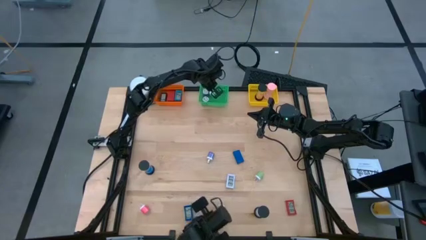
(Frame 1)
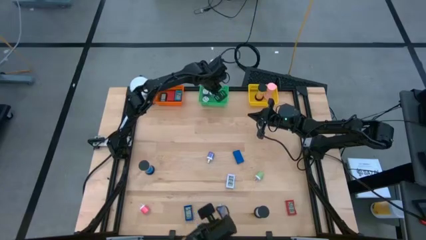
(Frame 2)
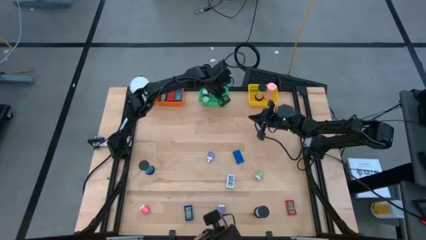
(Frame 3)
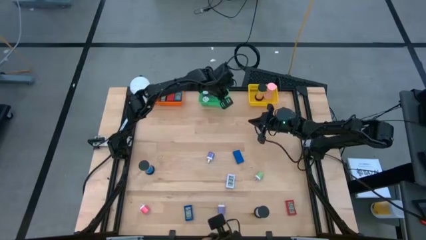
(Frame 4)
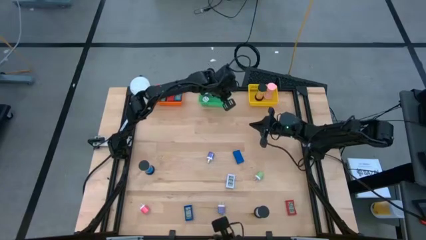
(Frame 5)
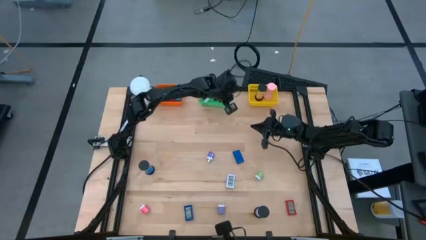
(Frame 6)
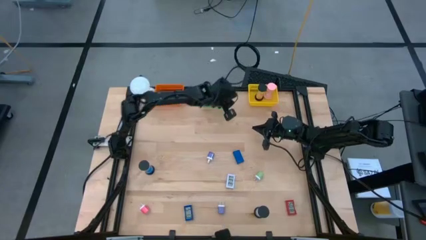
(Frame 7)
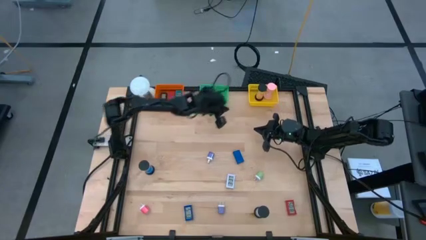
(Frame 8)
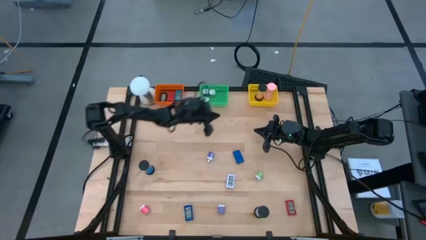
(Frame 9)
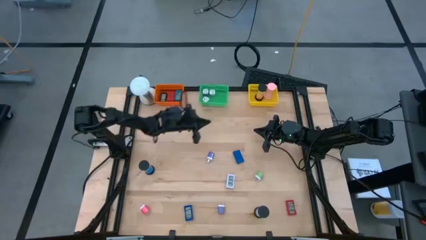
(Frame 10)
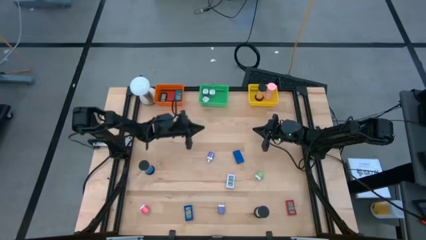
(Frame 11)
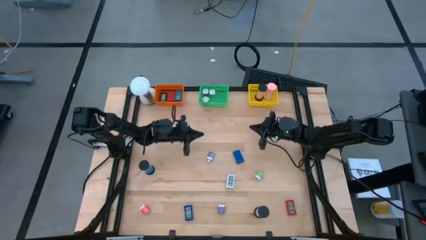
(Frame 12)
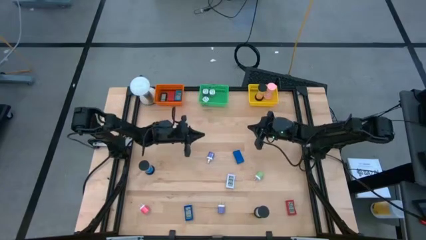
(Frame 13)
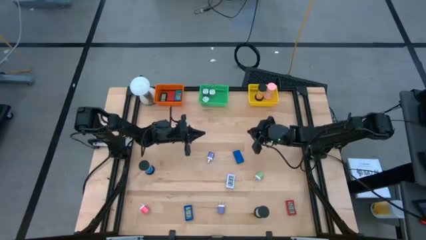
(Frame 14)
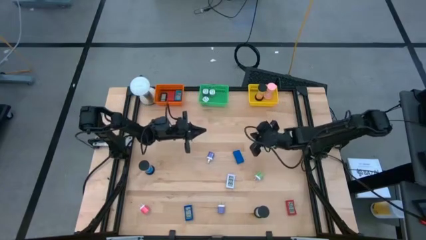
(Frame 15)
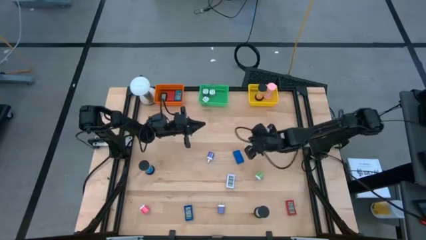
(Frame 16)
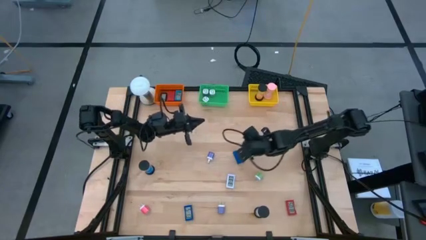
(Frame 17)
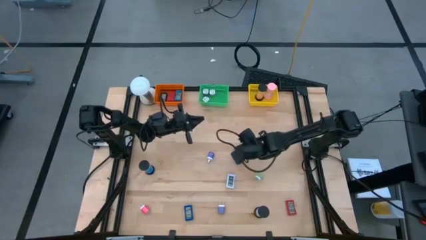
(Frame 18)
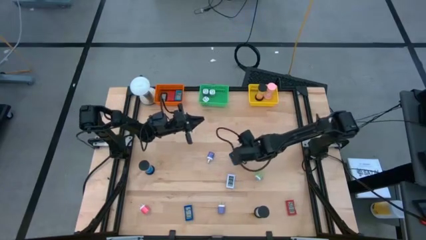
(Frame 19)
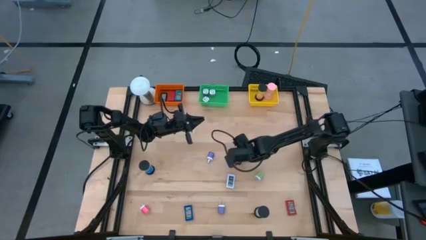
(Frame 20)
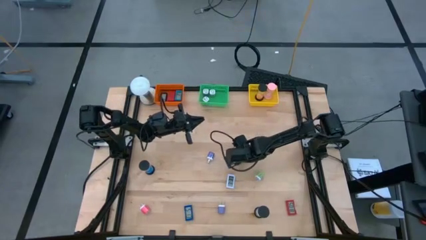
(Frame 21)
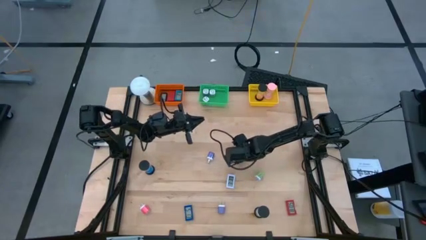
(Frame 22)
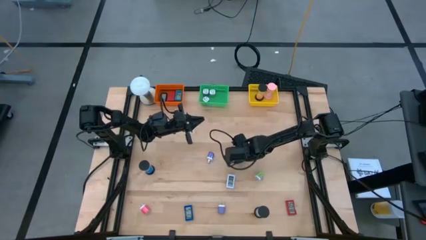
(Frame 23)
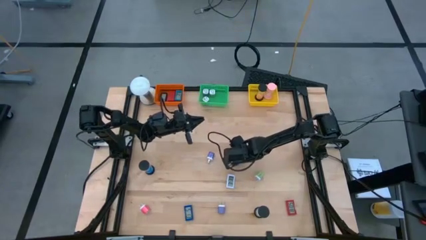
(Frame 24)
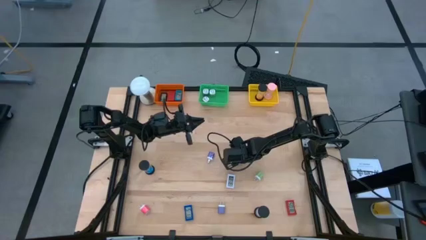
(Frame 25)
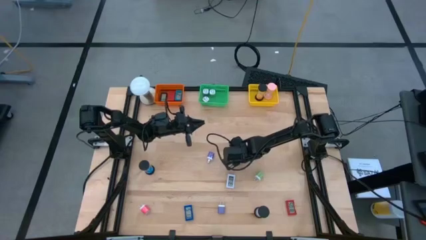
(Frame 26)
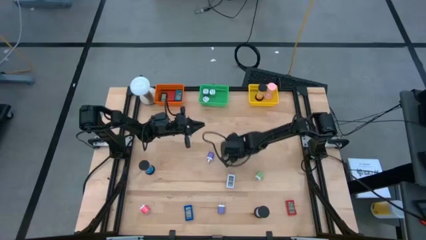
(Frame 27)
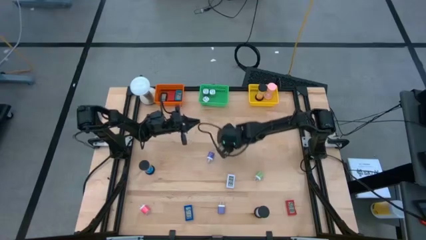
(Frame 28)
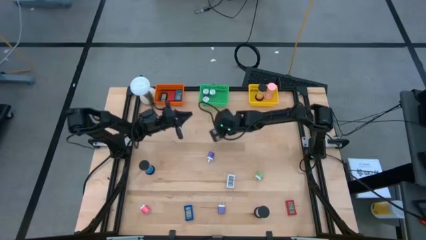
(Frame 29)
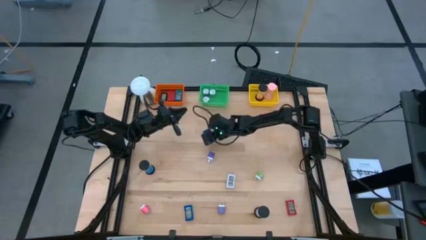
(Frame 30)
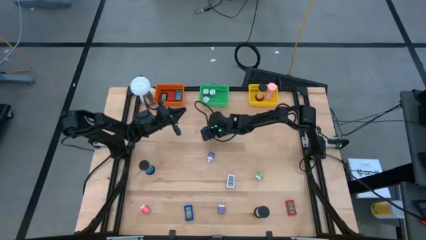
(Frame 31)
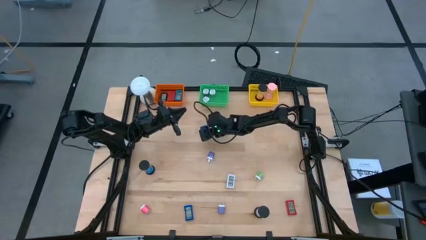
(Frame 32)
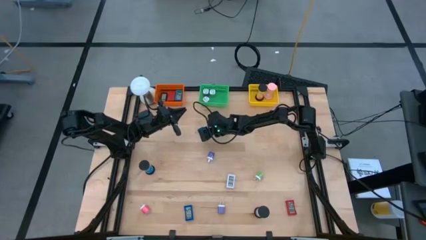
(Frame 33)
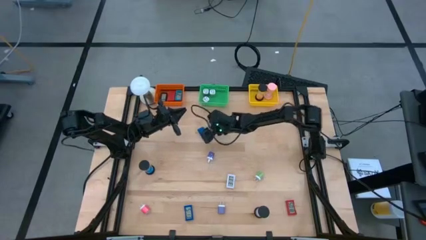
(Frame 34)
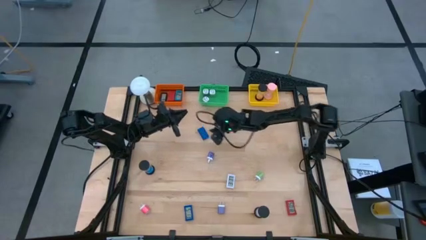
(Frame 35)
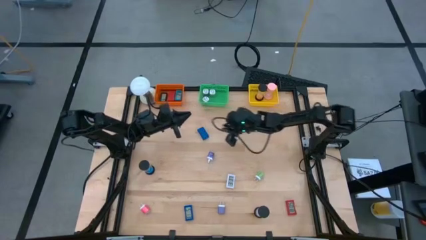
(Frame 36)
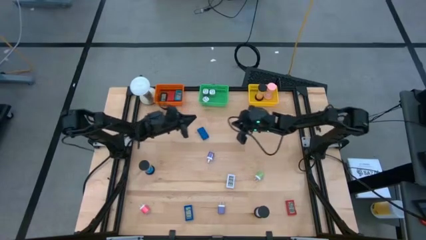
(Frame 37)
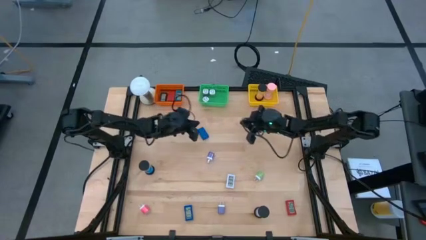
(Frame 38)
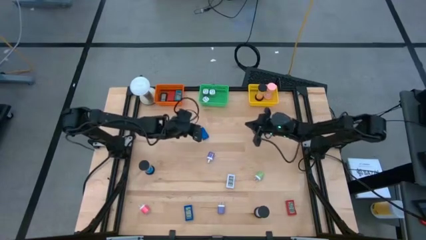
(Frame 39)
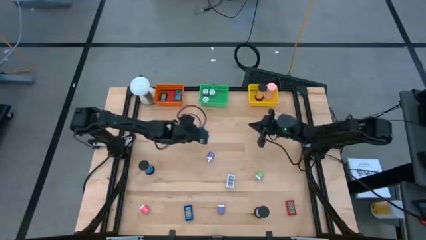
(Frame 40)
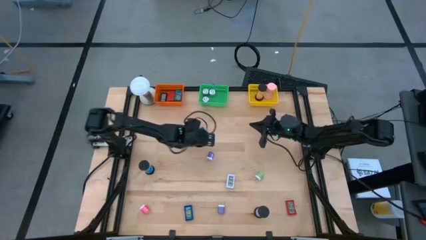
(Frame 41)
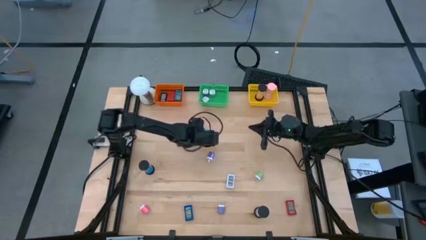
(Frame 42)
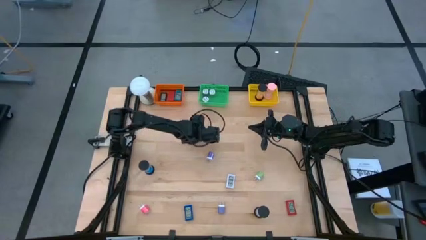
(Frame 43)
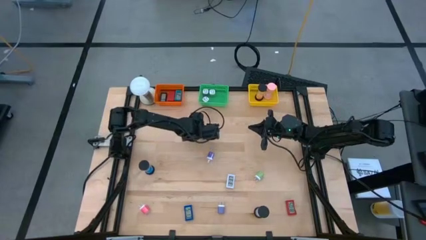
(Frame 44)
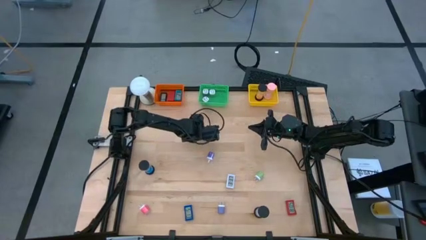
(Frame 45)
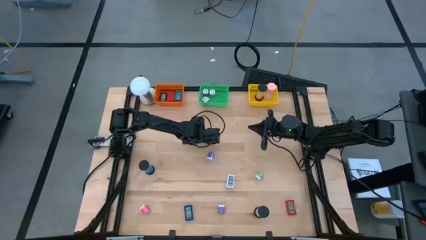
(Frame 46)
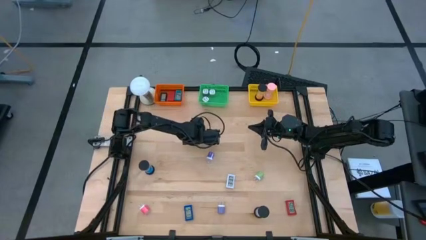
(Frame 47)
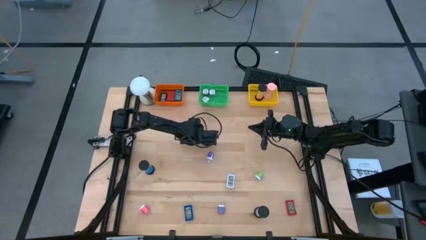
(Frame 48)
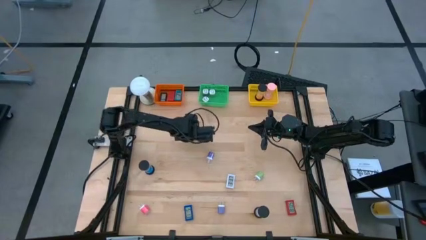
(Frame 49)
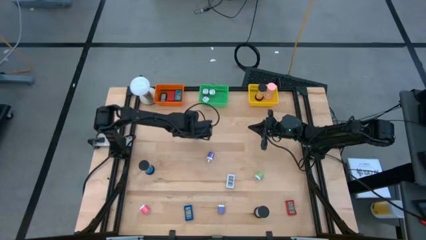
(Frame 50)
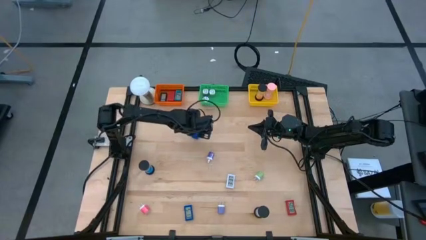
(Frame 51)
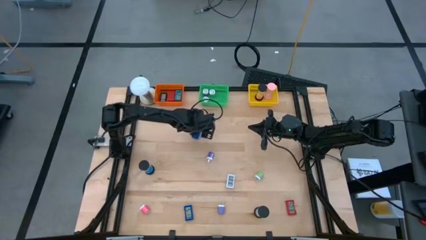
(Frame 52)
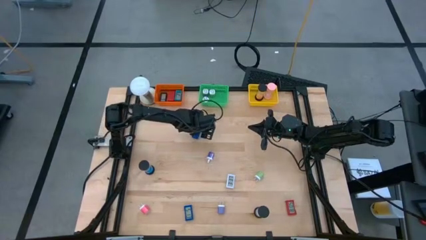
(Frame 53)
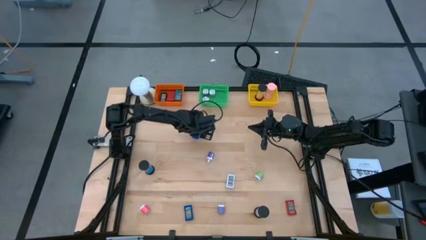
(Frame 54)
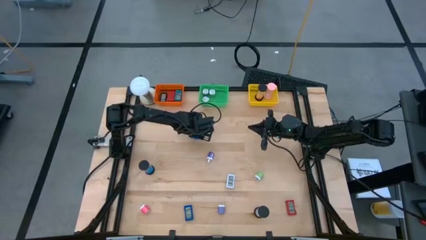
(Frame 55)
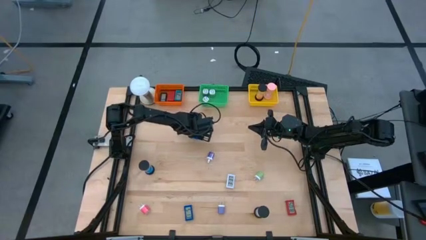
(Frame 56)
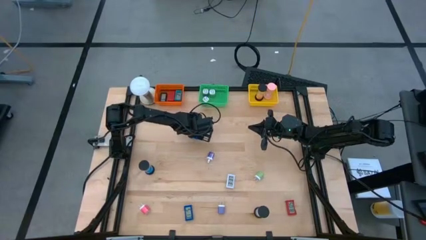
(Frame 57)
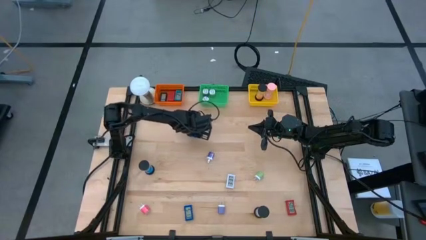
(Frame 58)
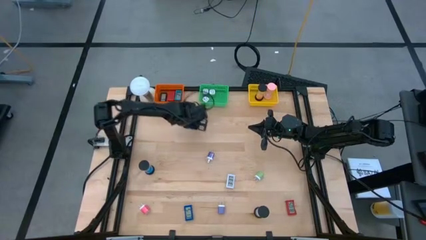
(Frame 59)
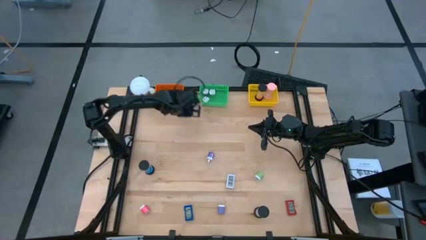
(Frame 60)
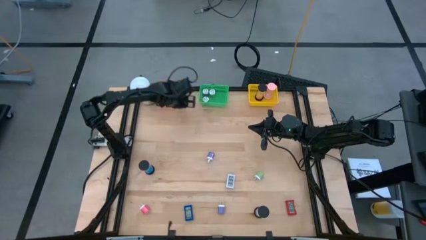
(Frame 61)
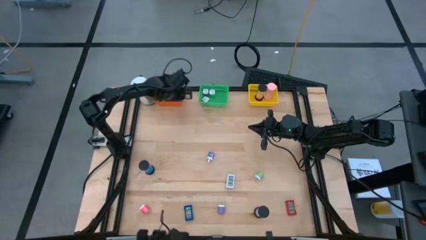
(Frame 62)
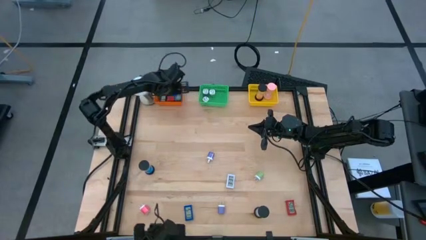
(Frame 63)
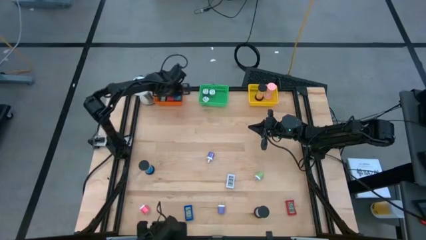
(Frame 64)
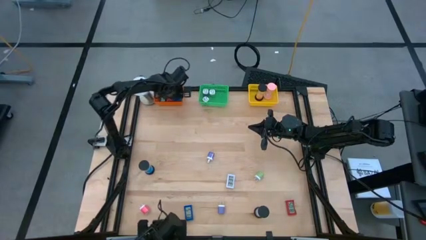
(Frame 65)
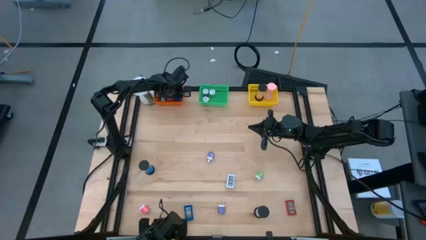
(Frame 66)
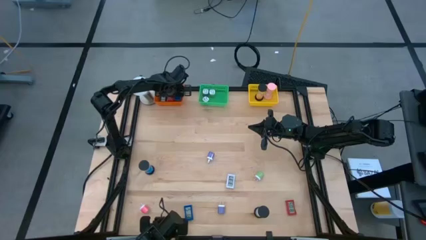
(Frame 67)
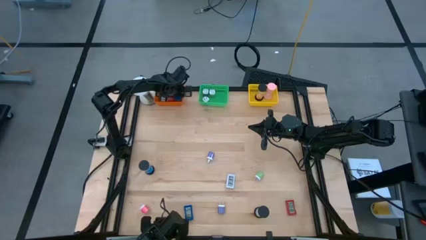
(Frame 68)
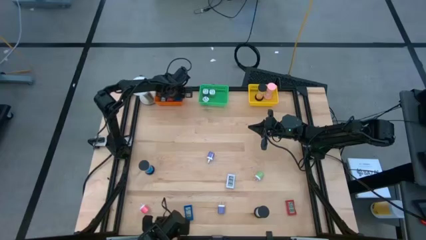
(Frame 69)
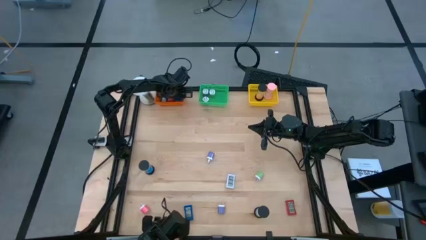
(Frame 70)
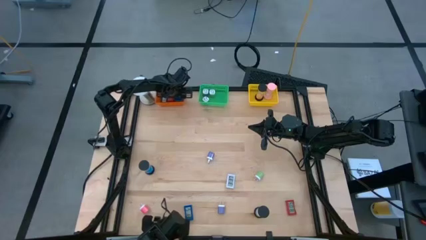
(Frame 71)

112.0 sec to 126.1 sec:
Task: Pick & Place Office items
Put the blue digital clock into the orange basket
